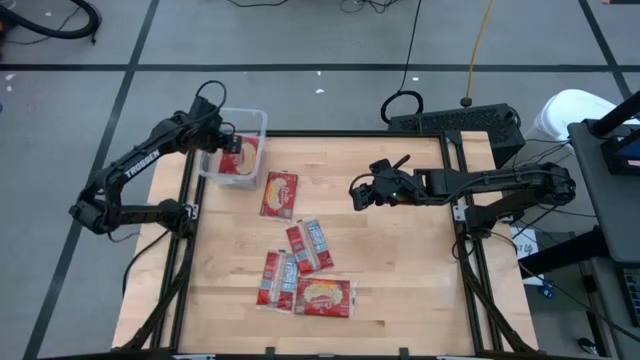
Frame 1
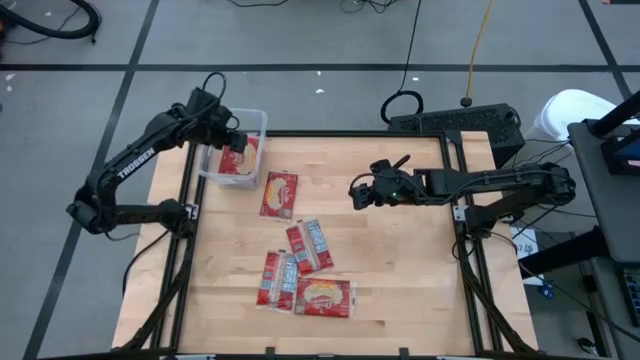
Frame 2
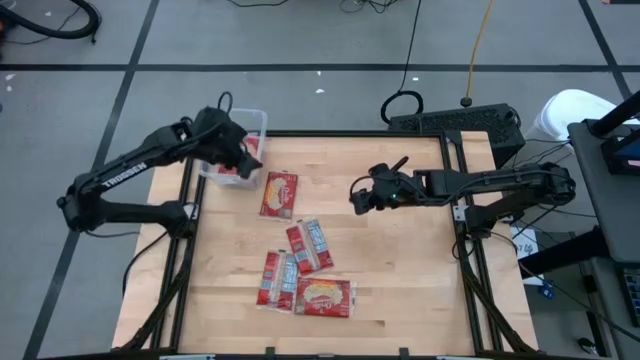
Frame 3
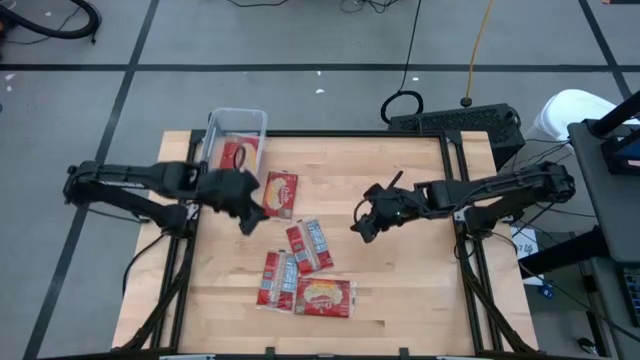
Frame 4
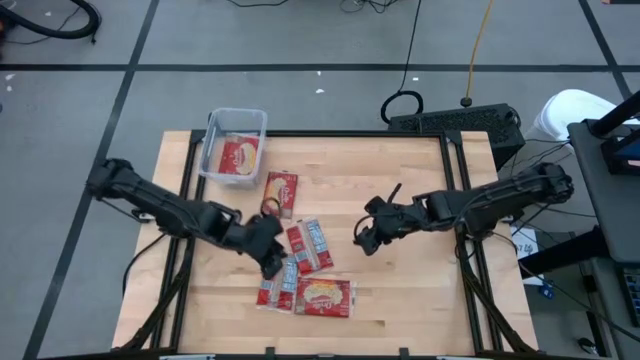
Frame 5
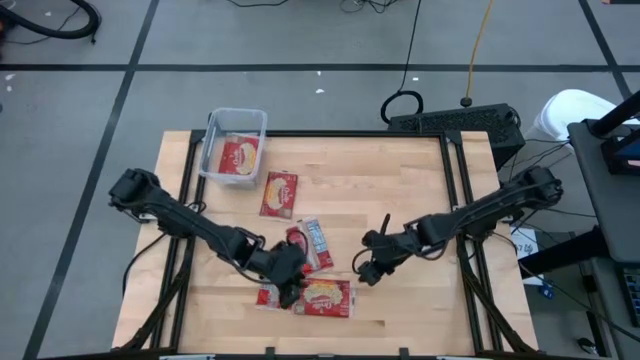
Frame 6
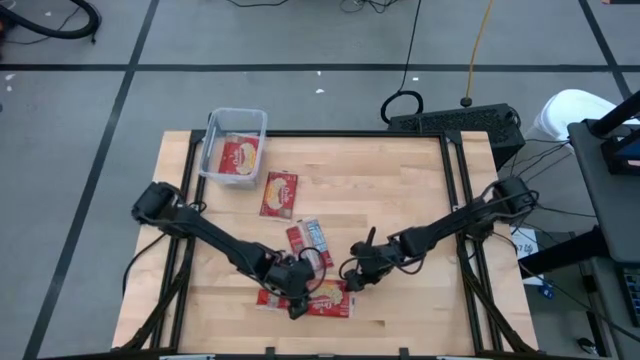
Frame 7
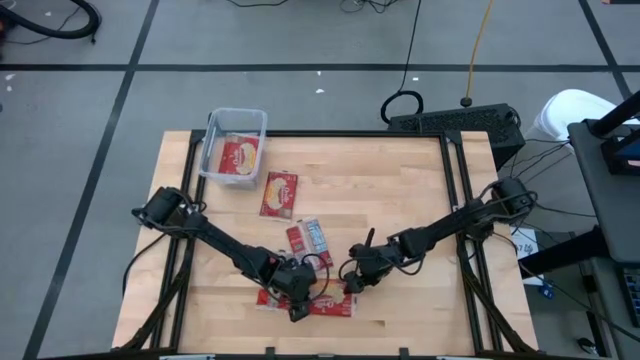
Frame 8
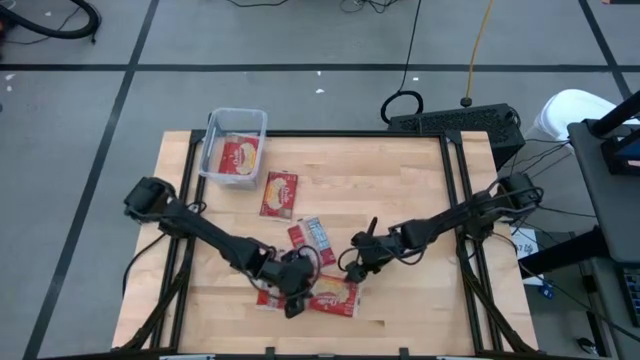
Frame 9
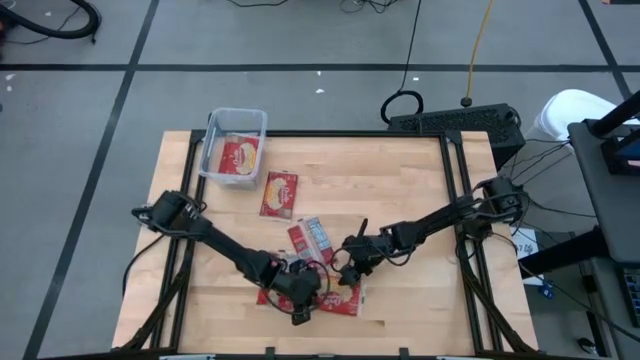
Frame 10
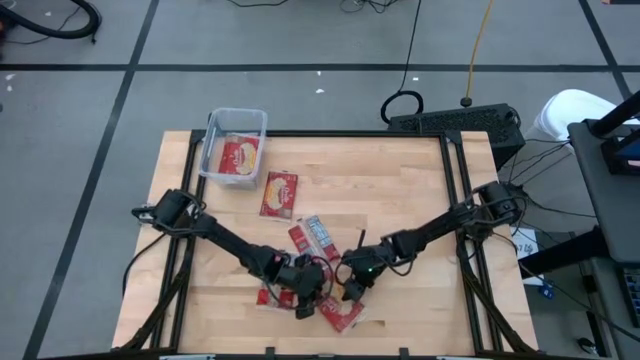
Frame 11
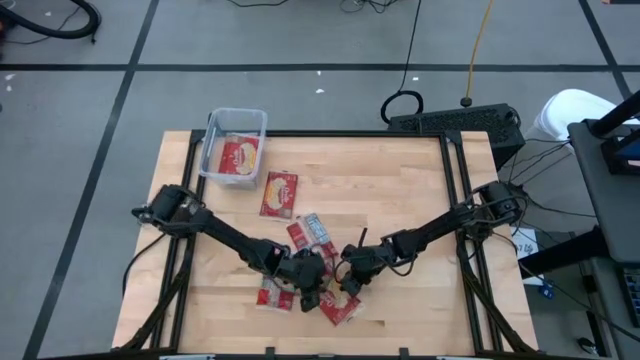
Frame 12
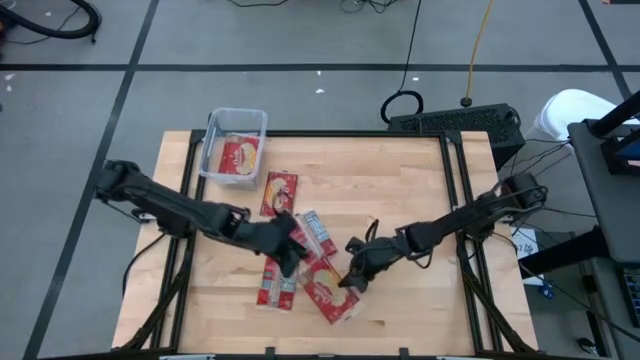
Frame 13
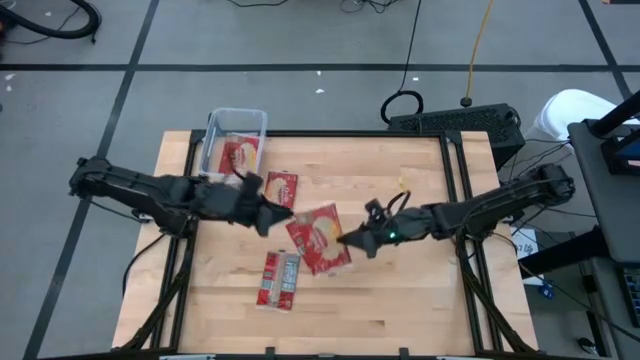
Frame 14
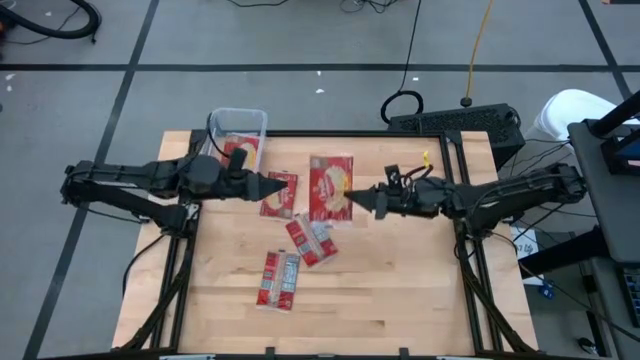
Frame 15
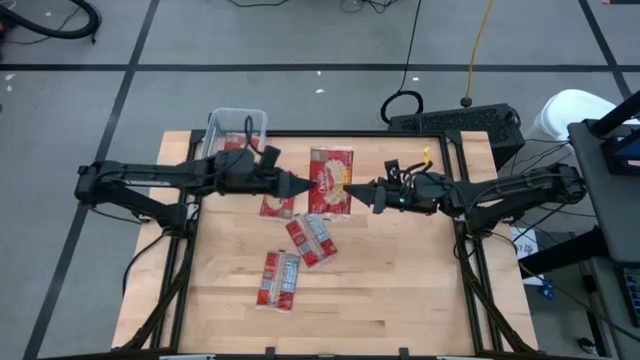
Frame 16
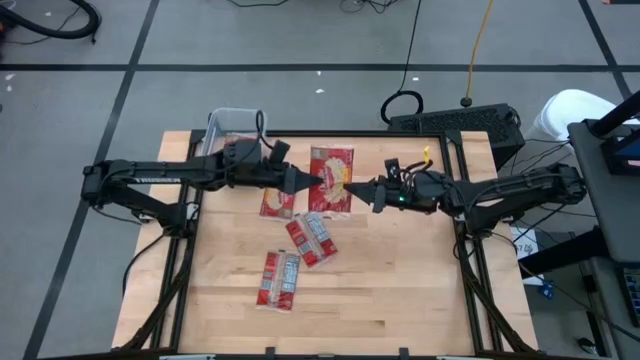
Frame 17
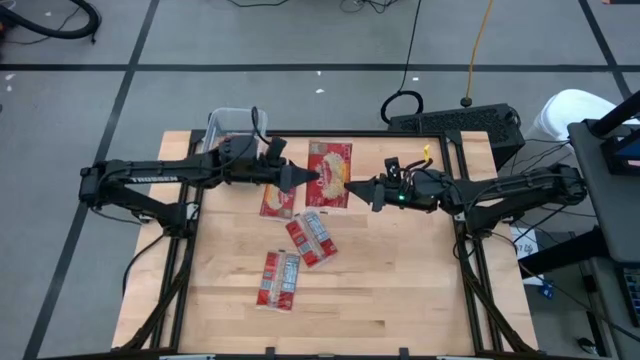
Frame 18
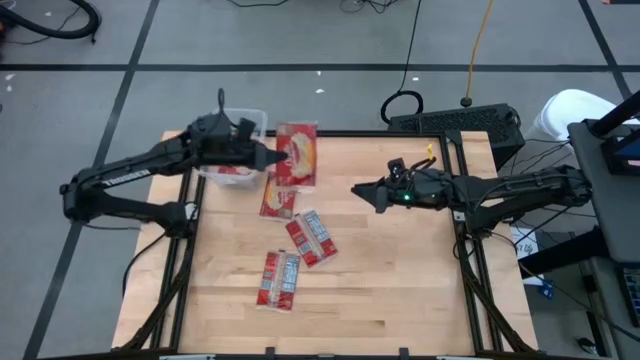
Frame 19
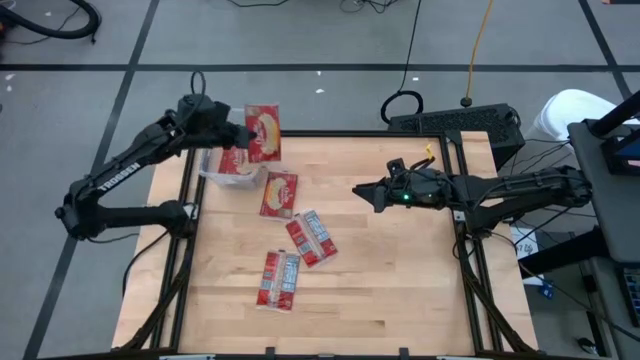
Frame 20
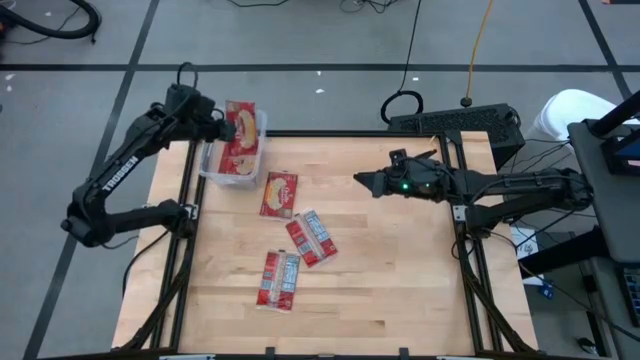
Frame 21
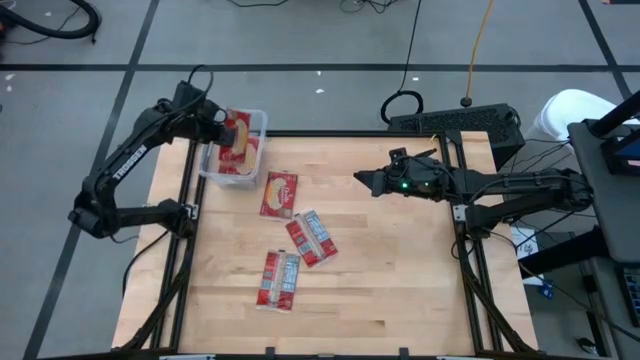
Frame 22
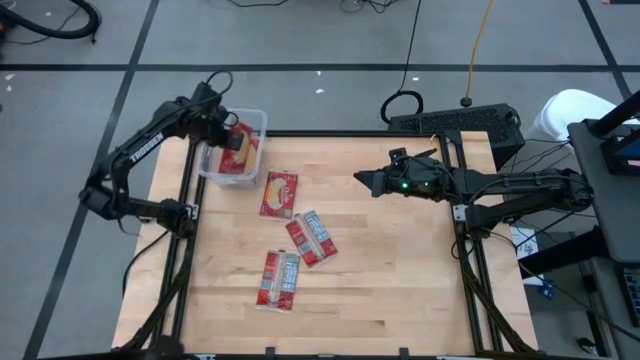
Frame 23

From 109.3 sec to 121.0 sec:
Task: Sort popcorn bags into baskets
Put the red popcorn bag into the transparent container

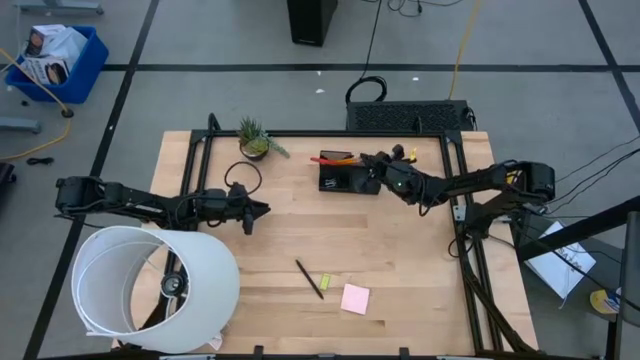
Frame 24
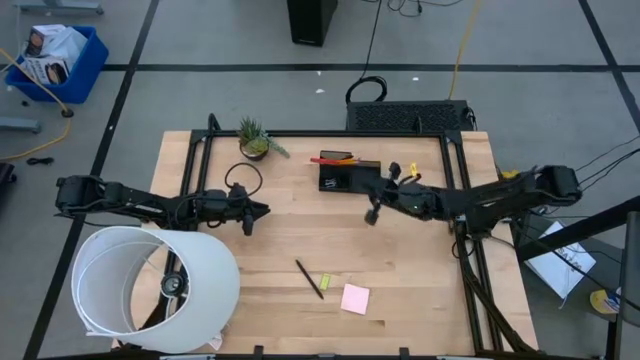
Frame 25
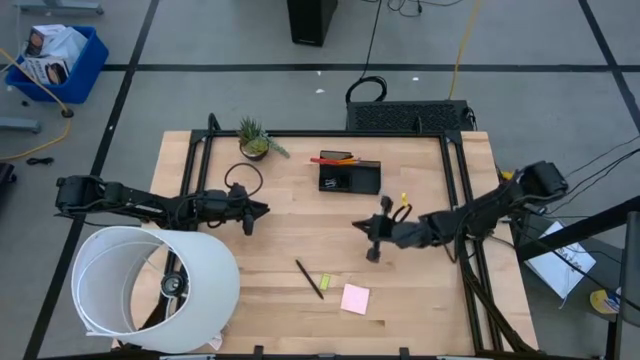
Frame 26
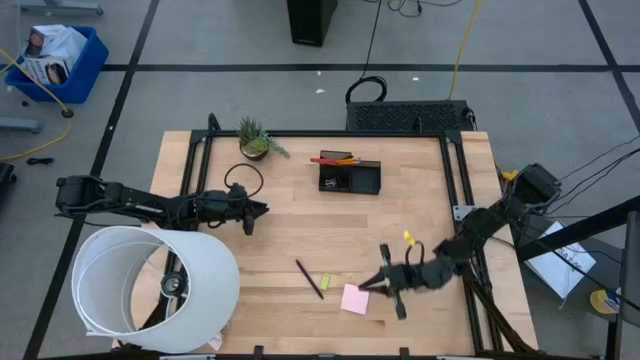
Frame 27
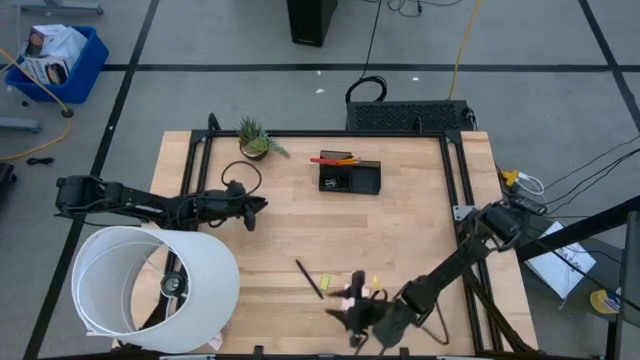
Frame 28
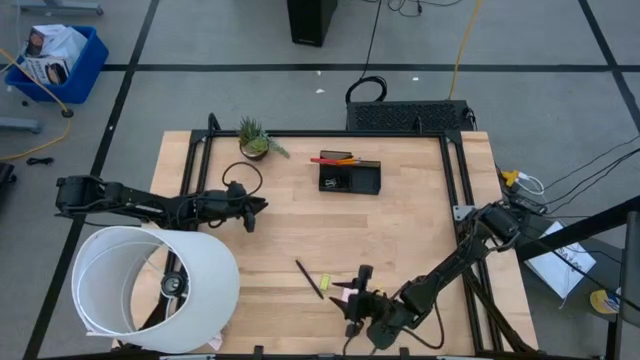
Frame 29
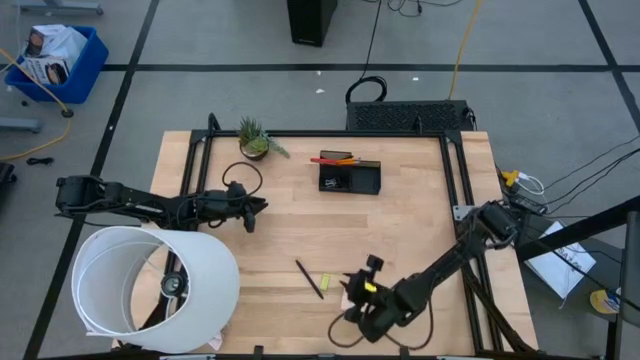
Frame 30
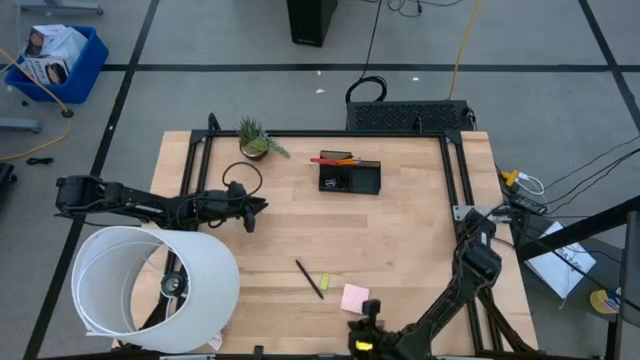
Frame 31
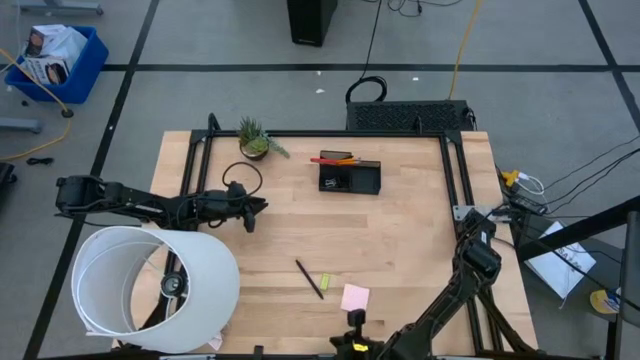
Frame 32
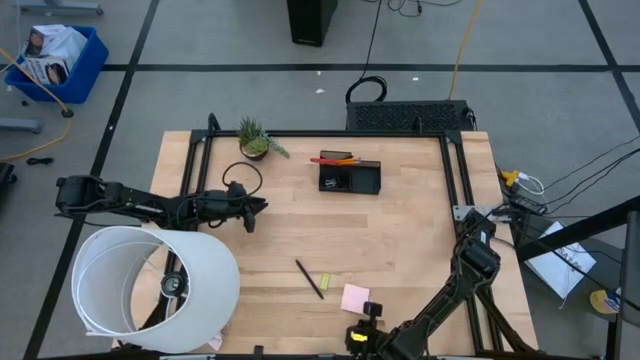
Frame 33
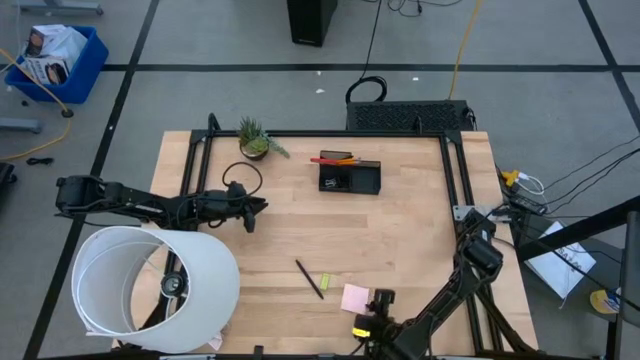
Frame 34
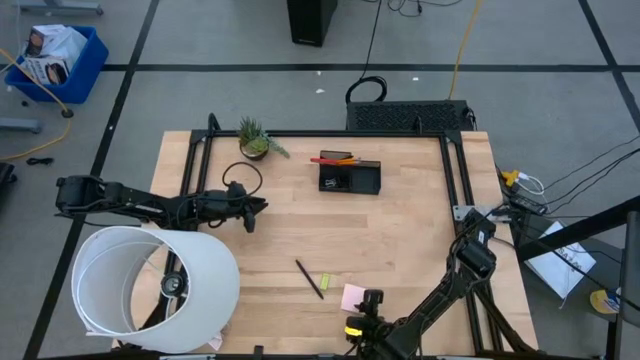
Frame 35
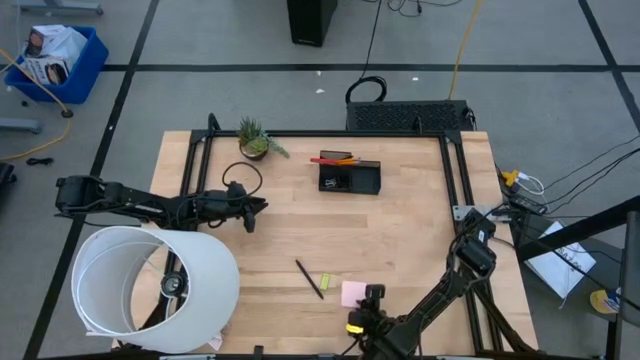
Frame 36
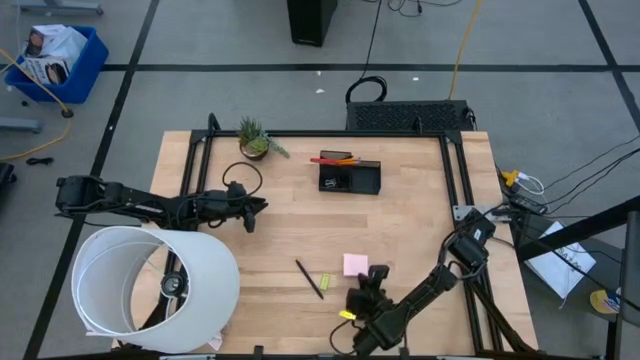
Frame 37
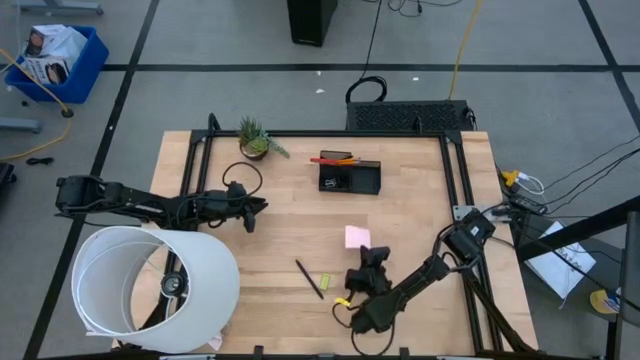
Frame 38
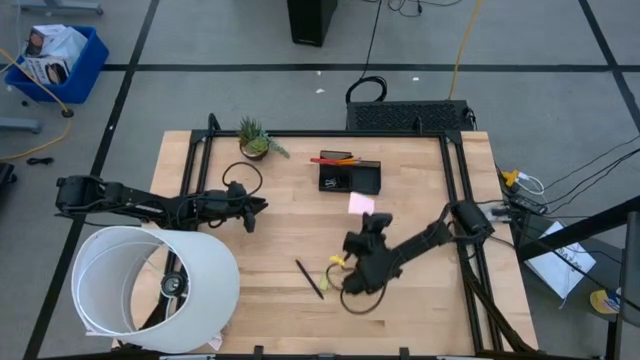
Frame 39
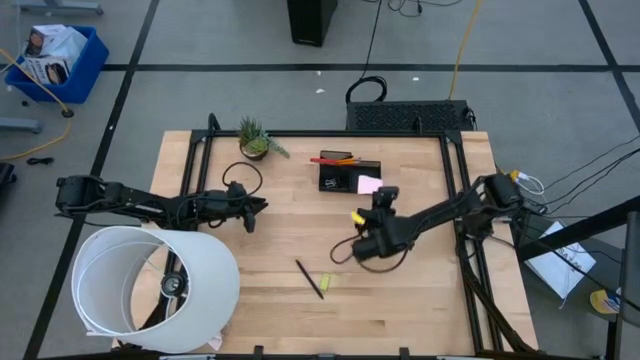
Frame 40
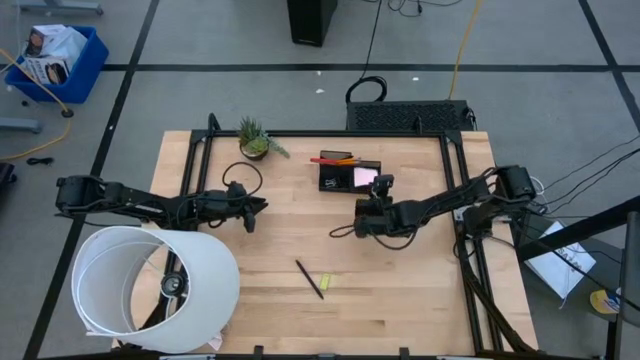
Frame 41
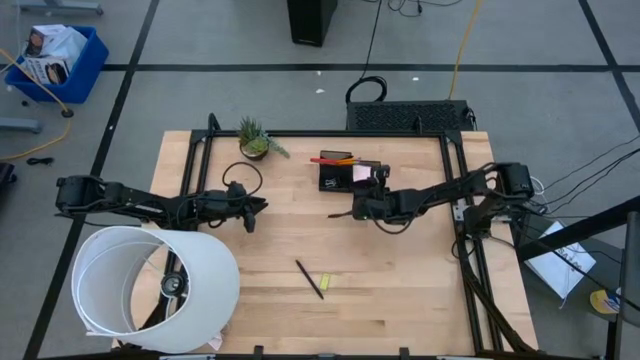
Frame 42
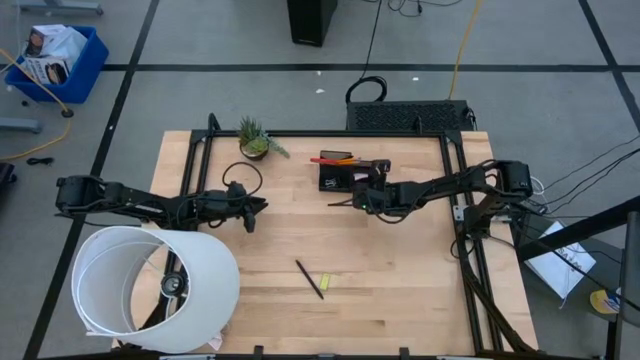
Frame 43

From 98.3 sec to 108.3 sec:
Task: Pick and place office supplies into organizer
Put the pink sticky notes into the desk organizer
